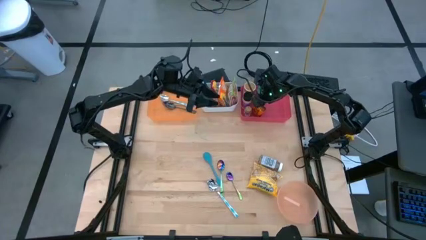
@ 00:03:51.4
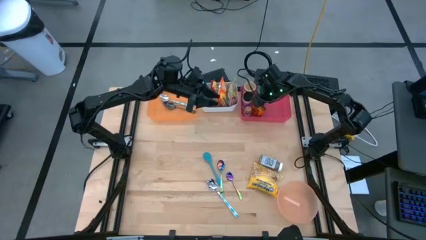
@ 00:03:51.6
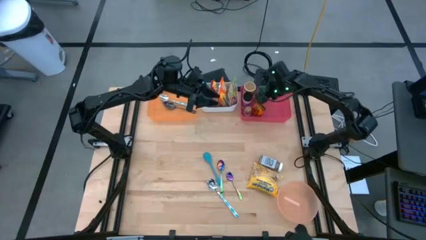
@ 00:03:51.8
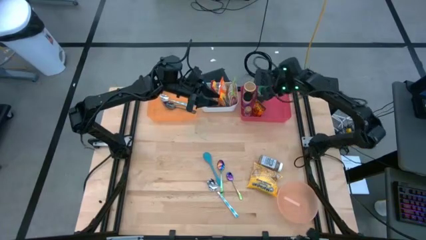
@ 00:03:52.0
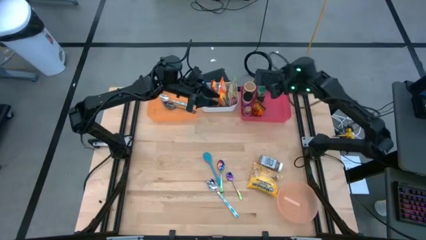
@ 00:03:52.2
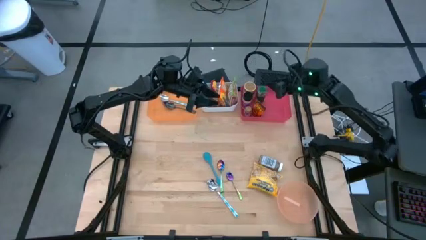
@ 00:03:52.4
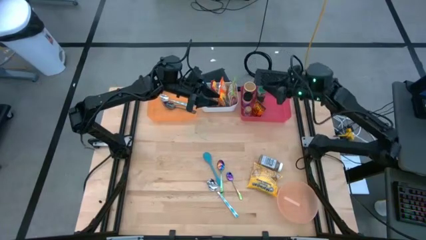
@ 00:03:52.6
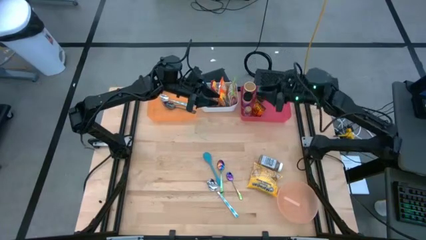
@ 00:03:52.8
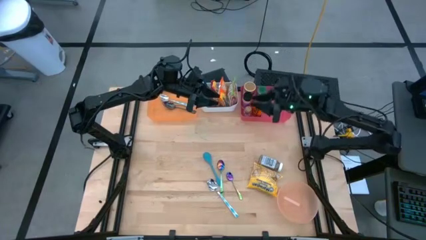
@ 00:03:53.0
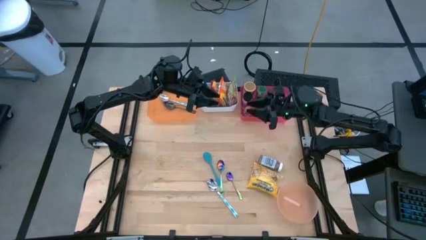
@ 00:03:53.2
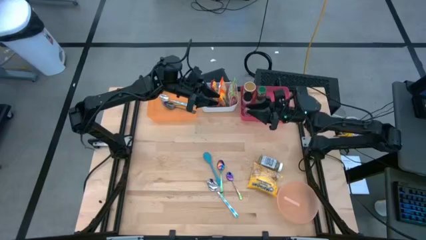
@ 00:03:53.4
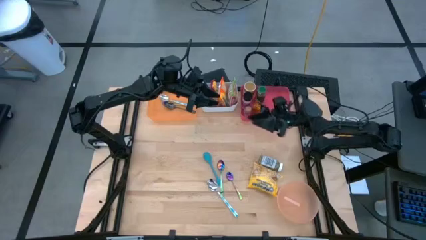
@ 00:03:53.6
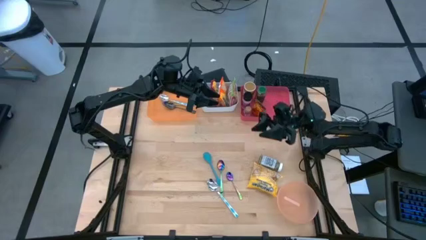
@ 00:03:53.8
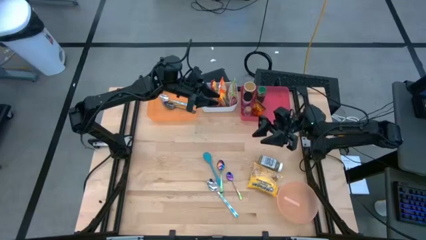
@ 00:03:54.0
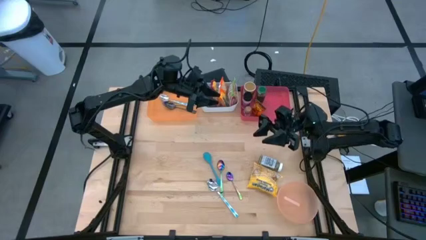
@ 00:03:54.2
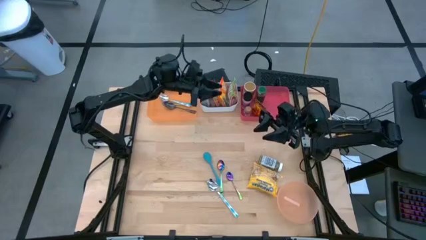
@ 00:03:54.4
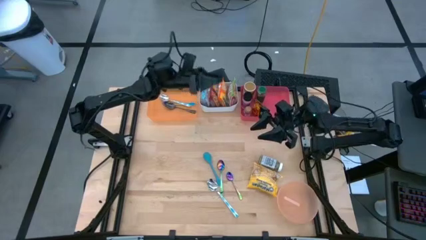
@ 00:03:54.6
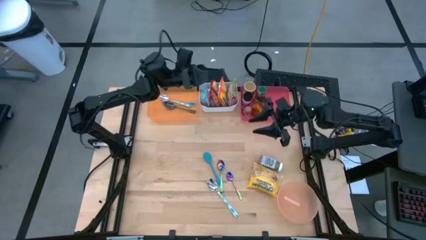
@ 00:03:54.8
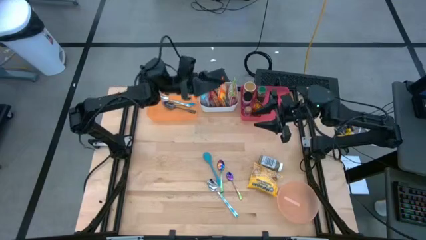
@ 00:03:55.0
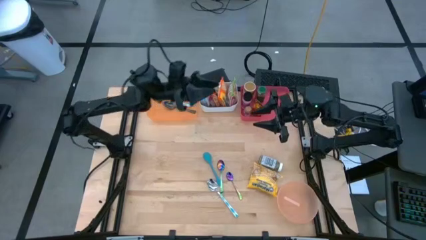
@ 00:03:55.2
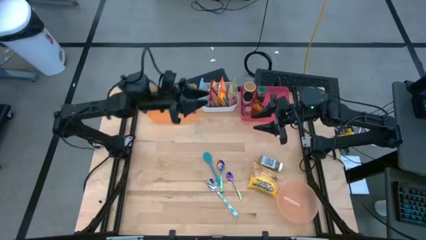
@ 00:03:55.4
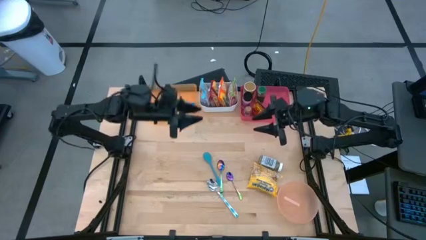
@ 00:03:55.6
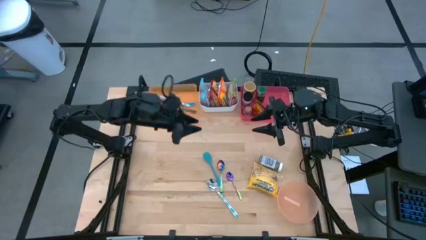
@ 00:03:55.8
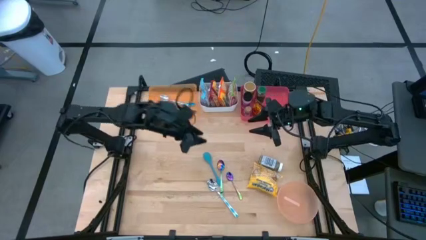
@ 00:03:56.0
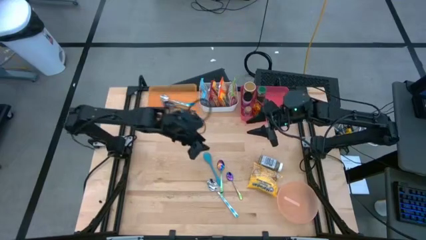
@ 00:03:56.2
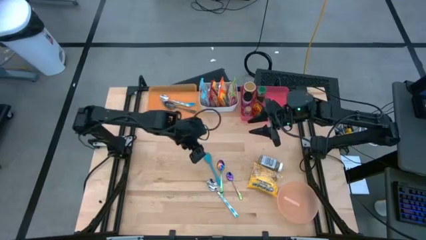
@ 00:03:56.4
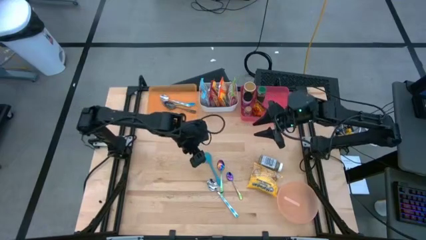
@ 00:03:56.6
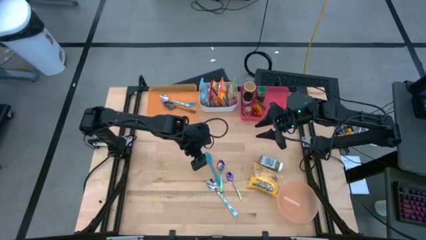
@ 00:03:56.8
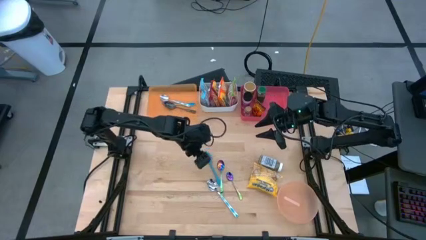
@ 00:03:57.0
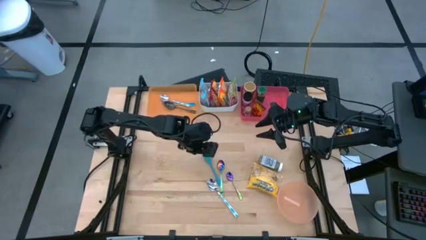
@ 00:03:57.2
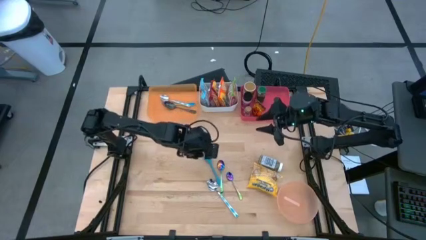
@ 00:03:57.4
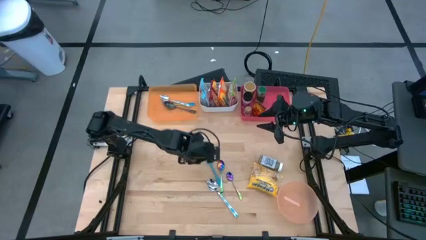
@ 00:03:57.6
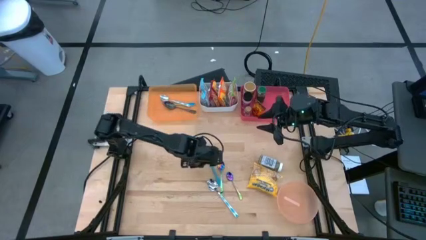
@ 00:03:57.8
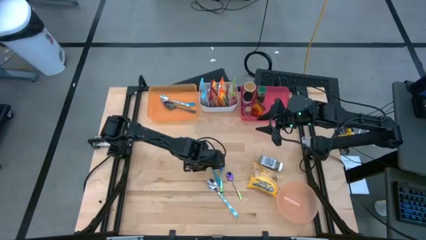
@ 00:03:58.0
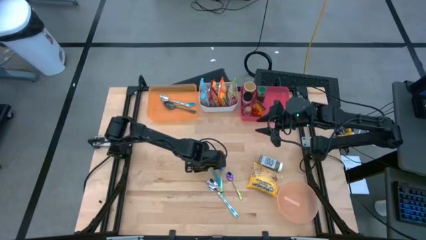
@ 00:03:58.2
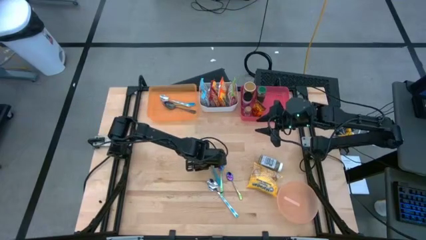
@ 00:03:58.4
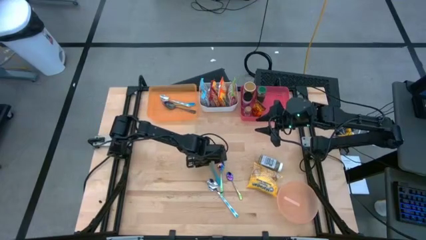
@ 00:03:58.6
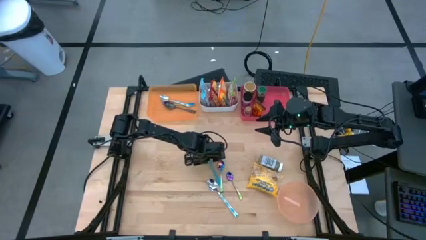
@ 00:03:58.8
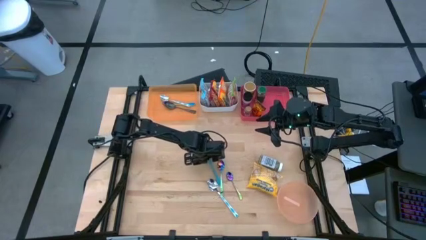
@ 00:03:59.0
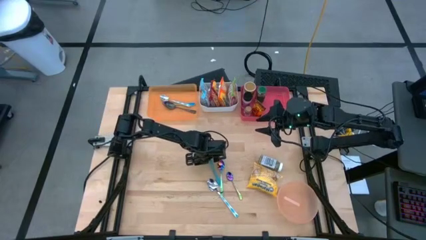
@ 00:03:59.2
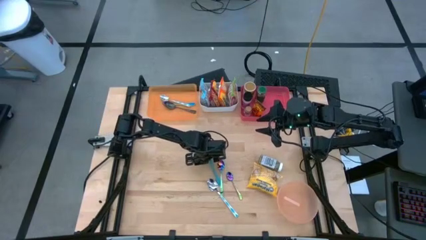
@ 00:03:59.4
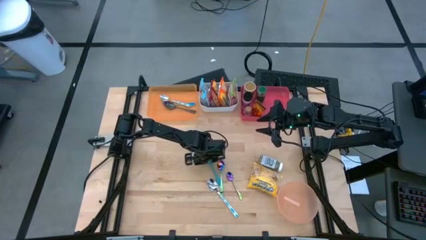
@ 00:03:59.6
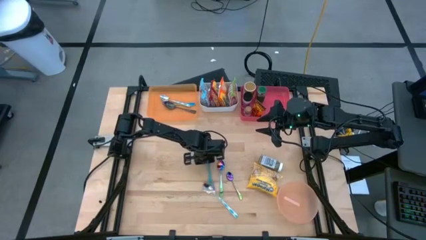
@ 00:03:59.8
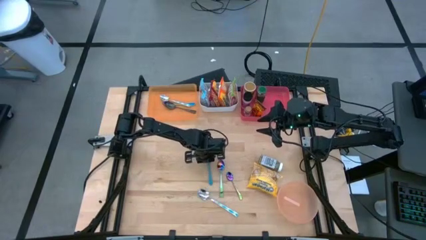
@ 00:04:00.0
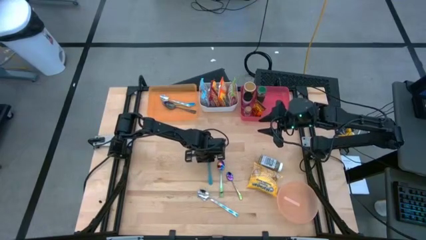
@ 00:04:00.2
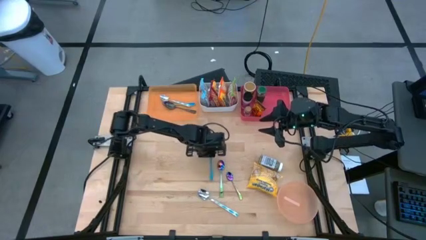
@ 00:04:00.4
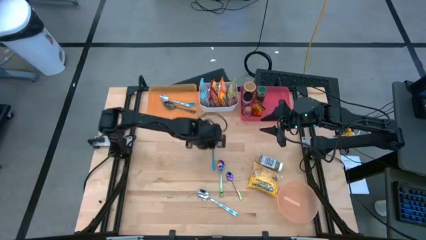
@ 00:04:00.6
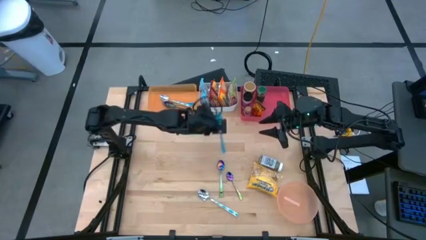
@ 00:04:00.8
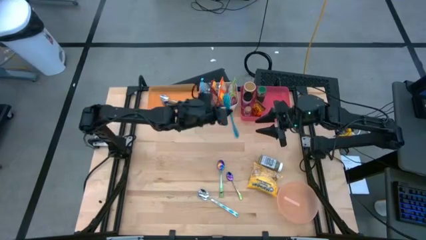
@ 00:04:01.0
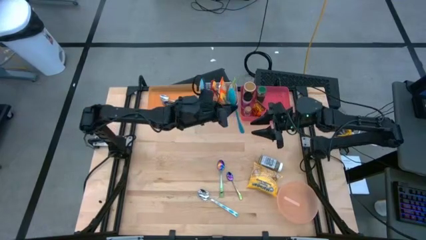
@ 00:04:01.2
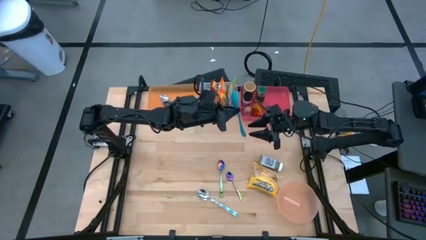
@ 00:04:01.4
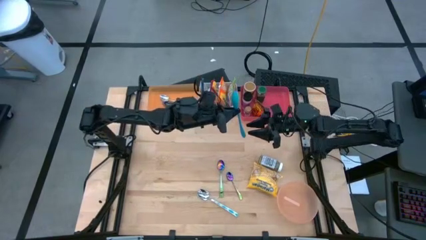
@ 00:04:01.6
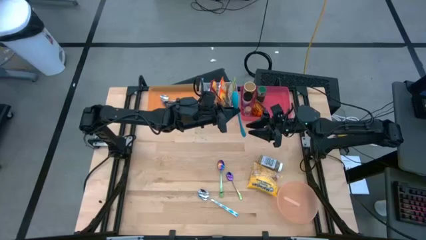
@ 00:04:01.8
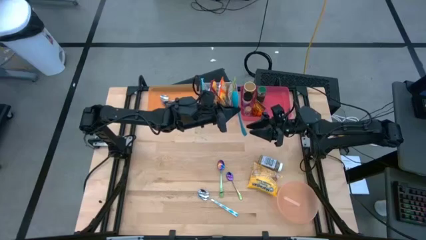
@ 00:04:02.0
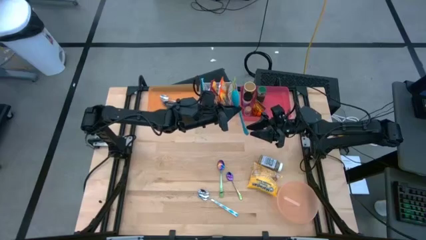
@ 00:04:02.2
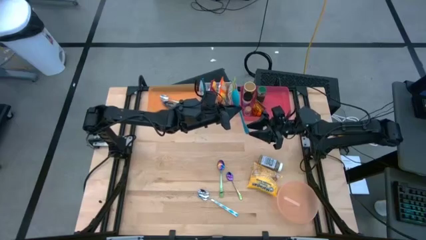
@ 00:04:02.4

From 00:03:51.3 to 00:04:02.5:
Task: Pick & Place Food Item
Put the blue baby spoon into the orange bin
